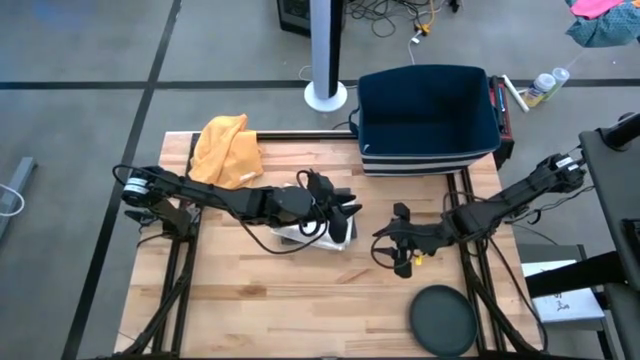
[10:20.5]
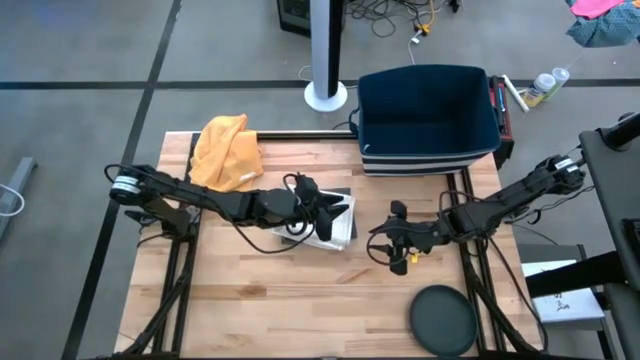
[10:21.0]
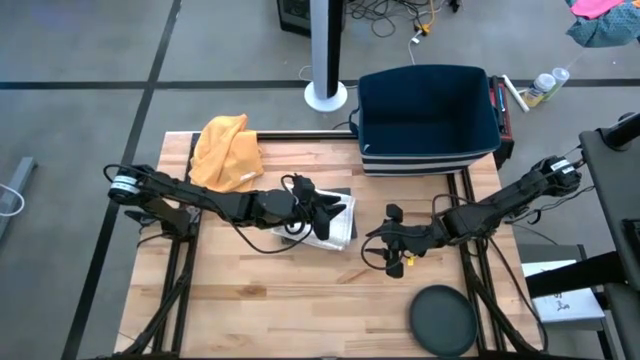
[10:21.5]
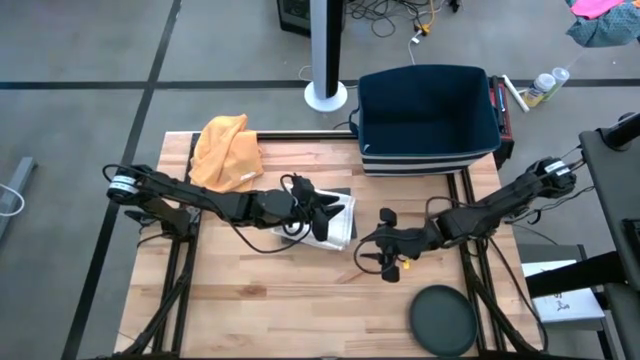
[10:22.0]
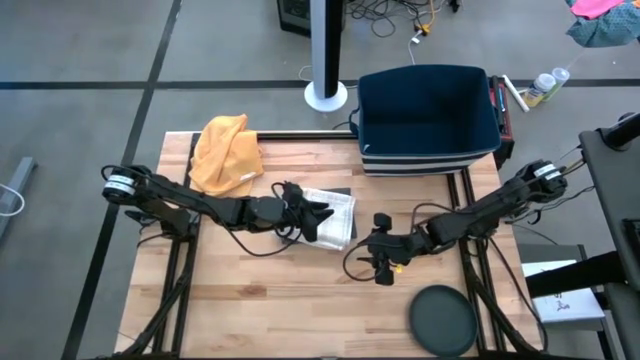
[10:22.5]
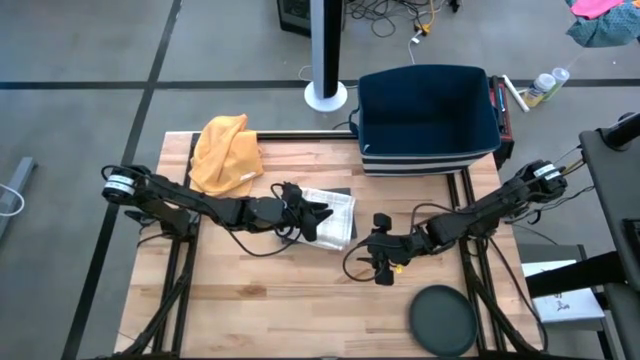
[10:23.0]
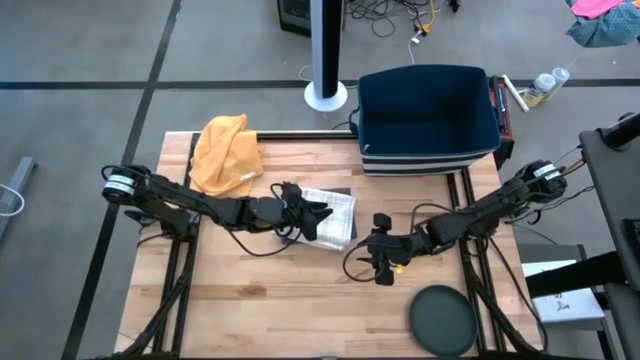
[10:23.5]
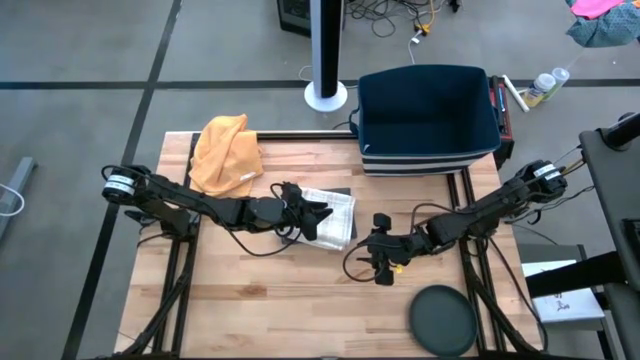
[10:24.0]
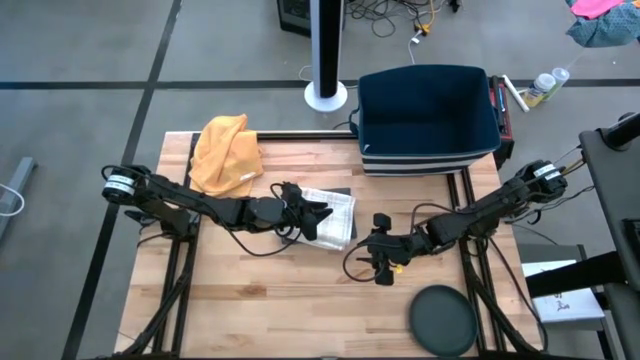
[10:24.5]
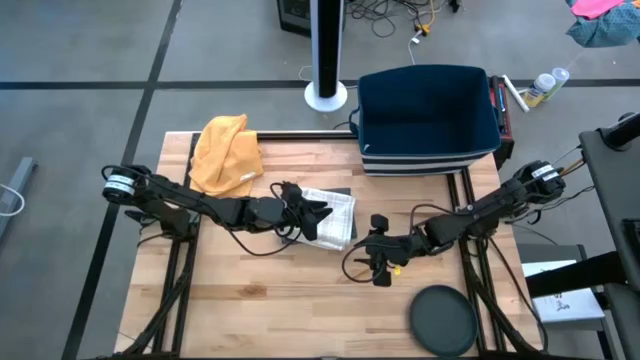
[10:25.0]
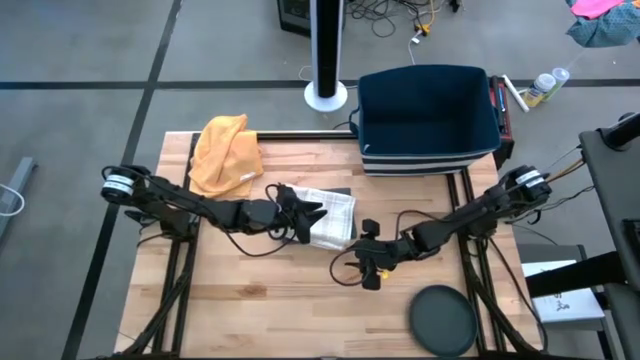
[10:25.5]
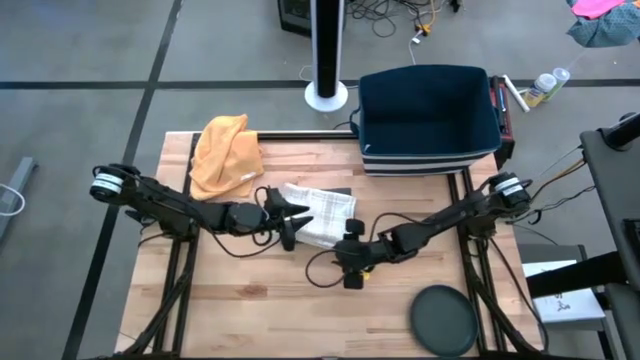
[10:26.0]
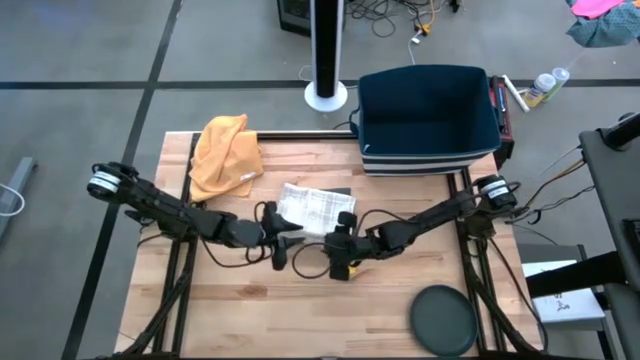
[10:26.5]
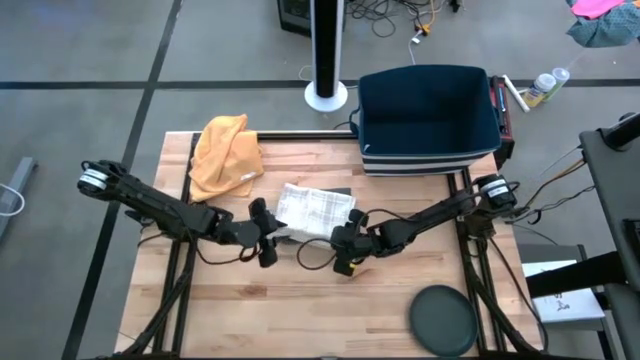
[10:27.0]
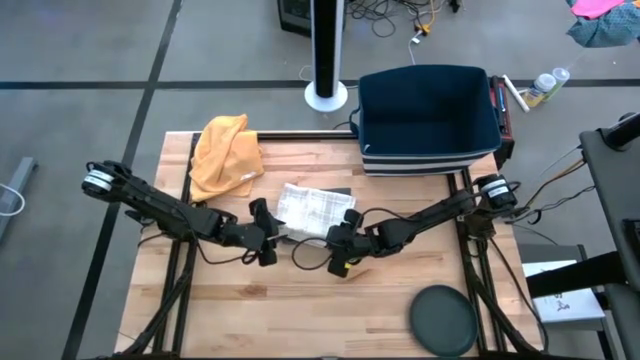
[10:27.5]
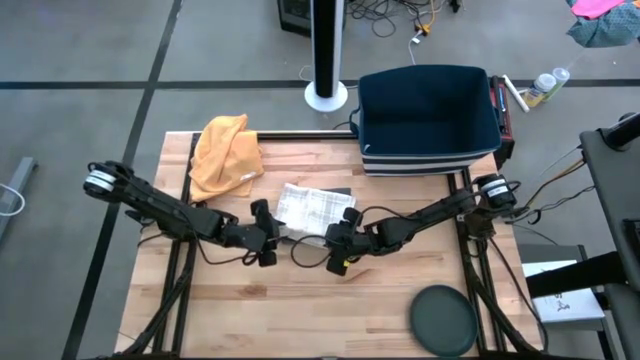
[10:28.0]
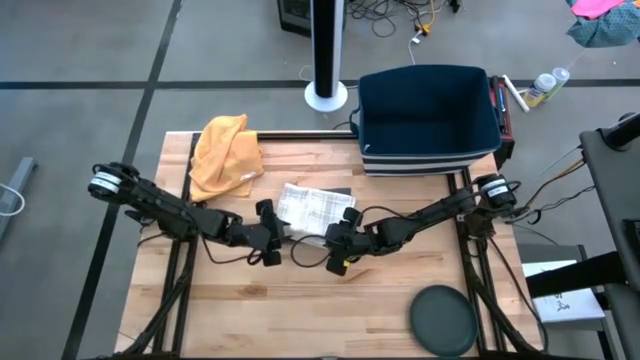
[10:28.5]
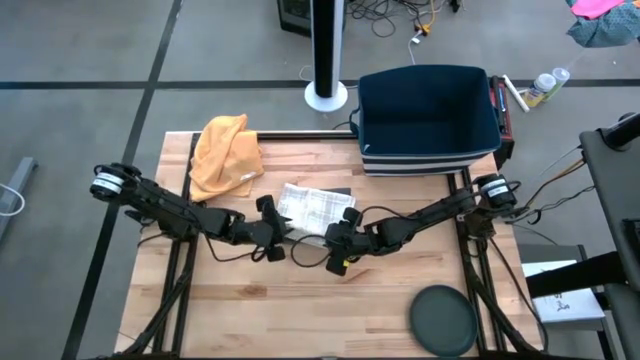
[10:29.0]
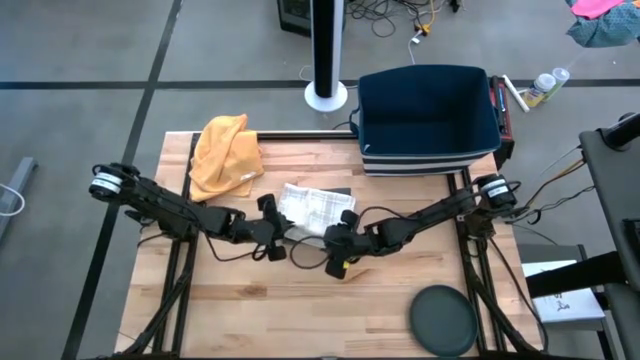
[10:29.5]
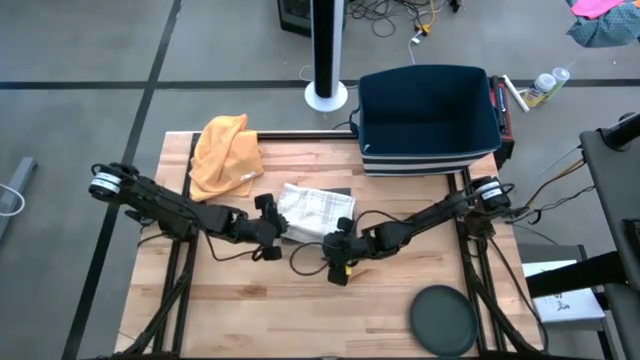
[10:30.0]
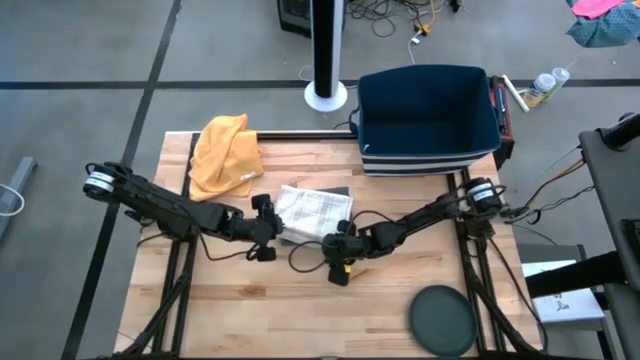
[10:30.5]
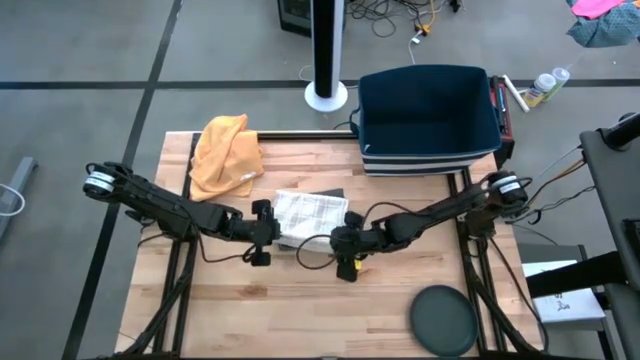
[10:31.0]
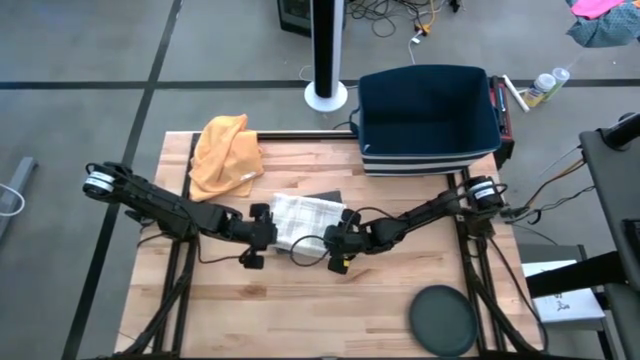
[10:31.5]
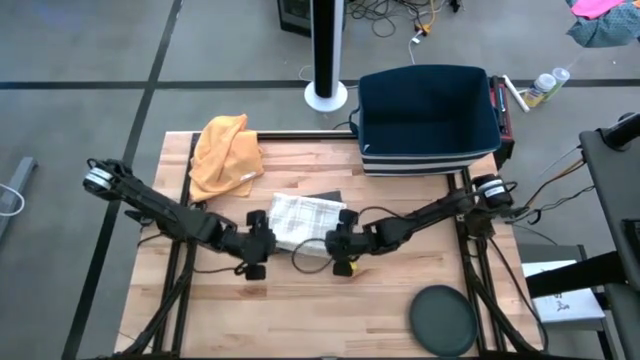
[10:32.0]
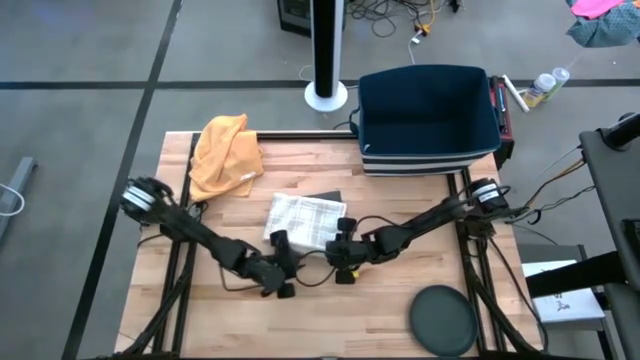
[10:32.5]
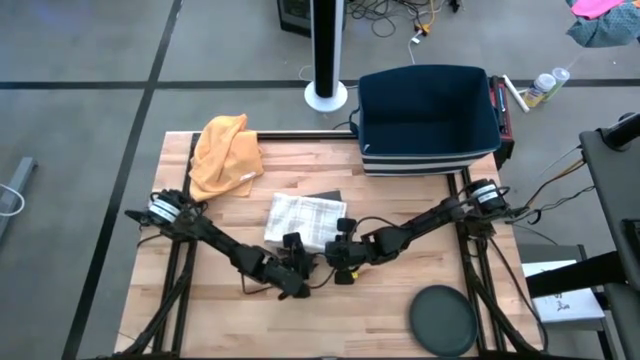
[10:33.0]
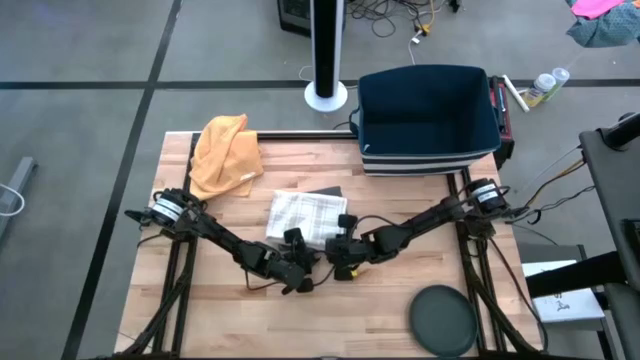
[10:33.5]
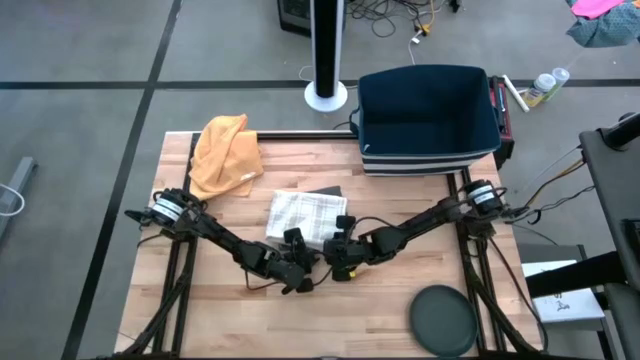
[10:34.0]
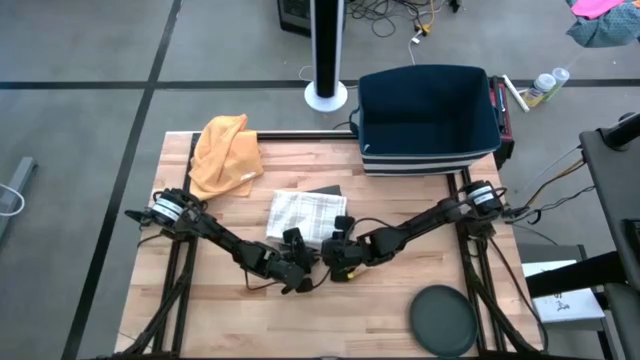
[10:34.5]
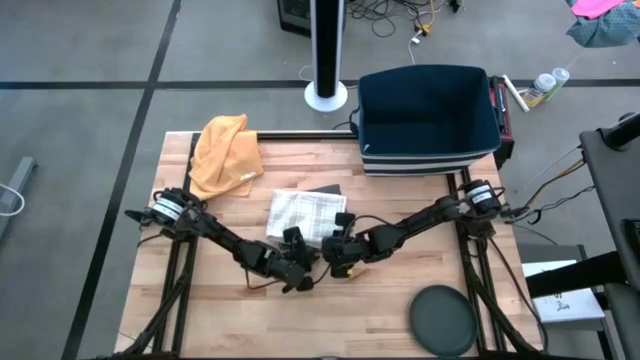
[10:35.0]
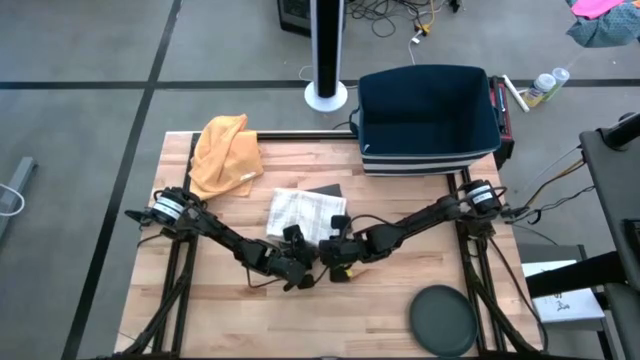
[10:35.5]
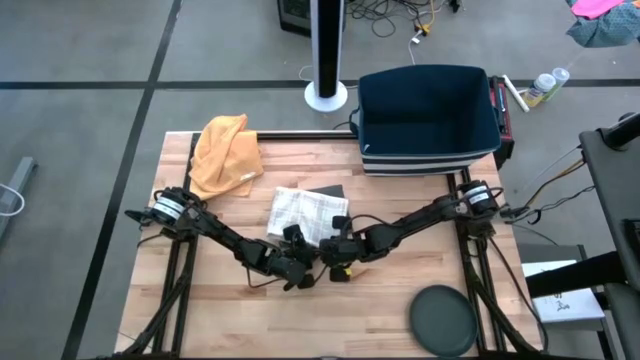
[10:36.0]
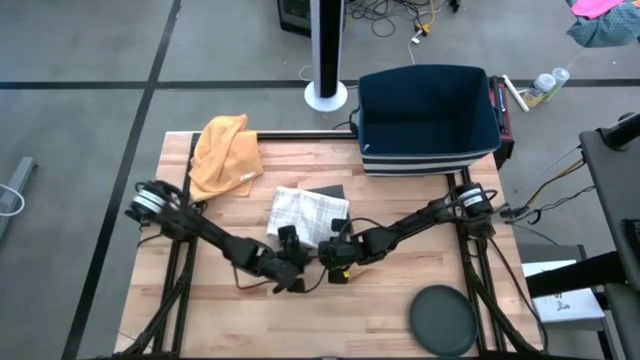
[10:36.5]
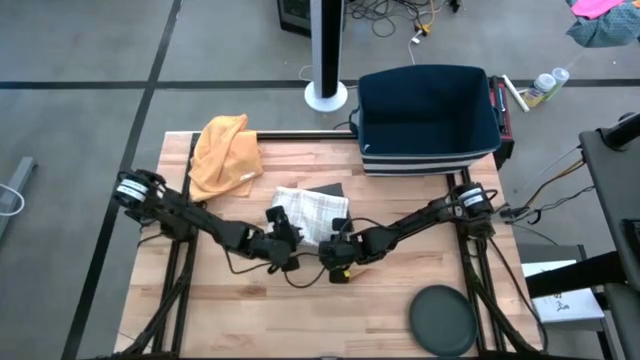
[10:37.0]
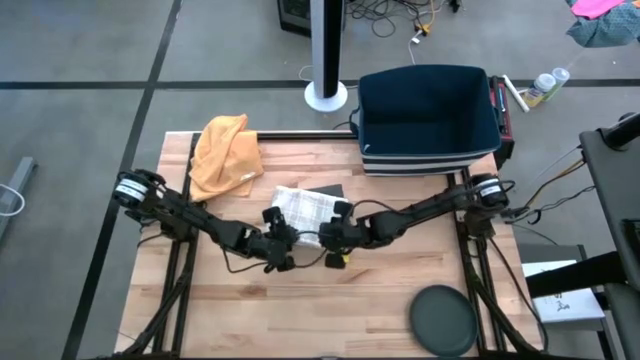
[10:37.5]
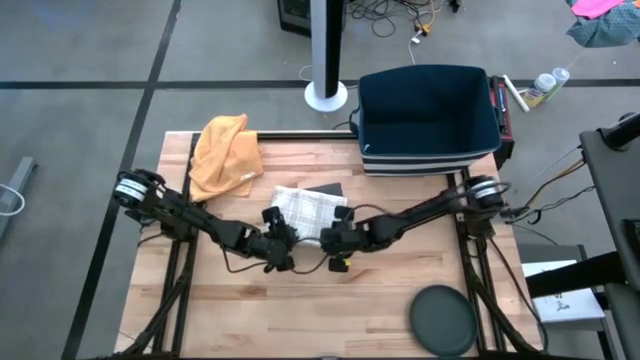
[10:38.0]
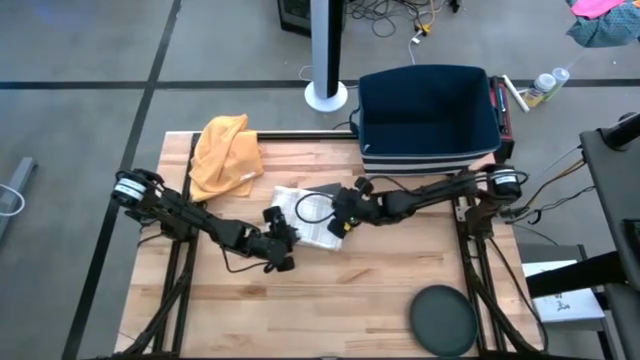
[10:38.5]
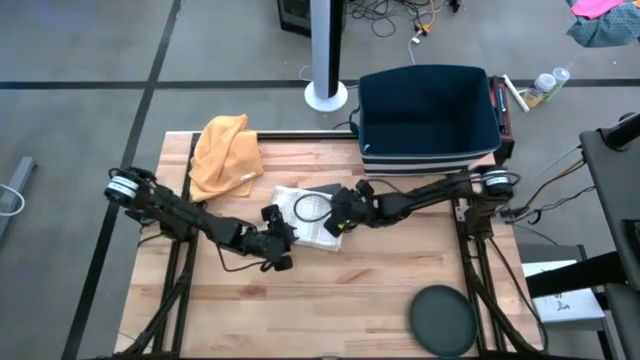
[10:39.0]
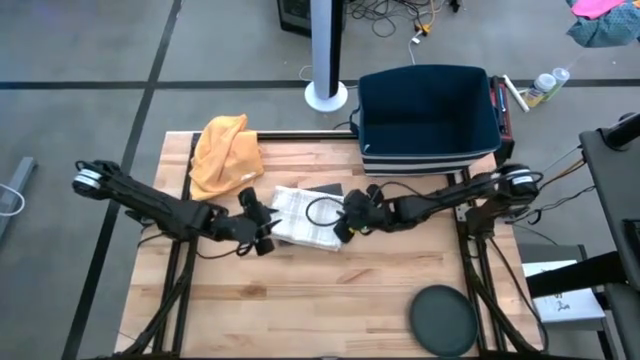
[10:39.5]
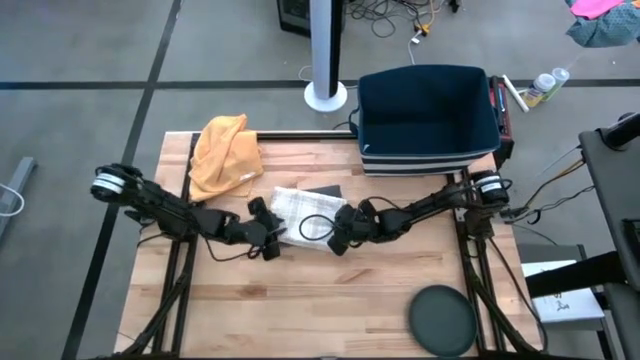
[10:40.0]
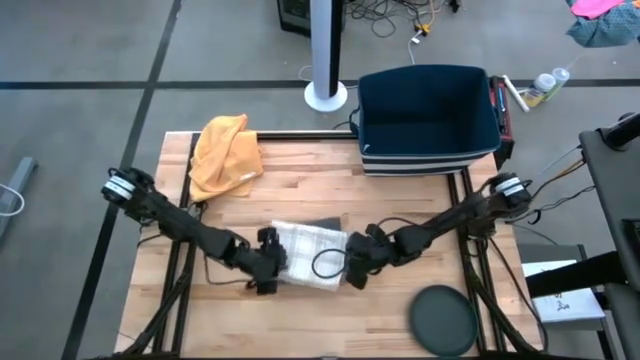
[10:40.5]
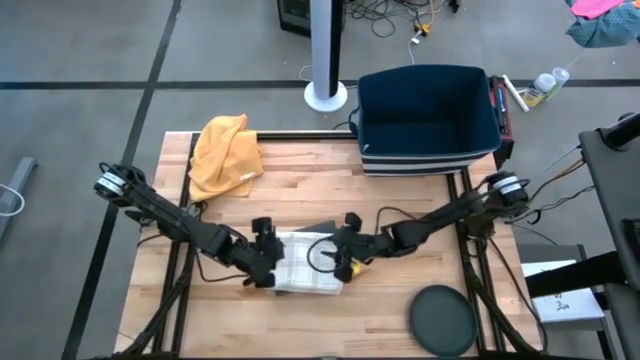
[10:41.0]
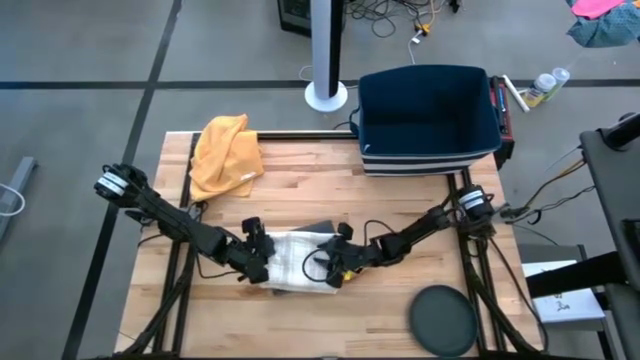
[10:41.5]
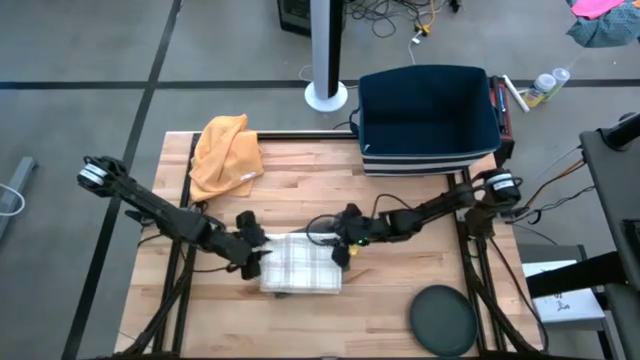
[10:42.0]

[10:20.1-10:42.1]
Task: Fold kitchen towel into neat rectangle
Stack the white patterned towel on top of the gray towel
